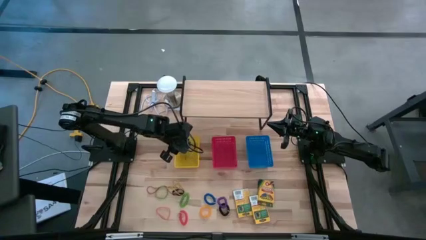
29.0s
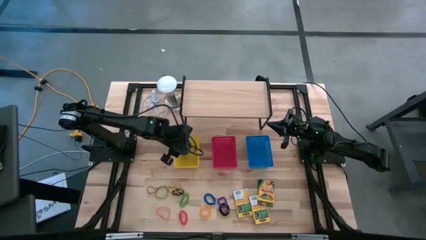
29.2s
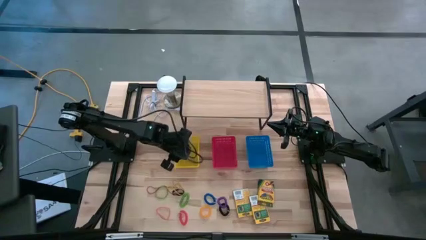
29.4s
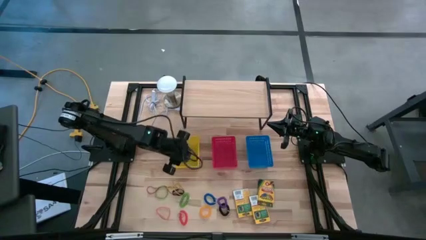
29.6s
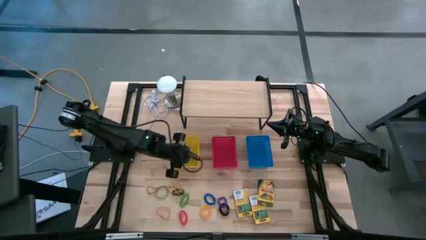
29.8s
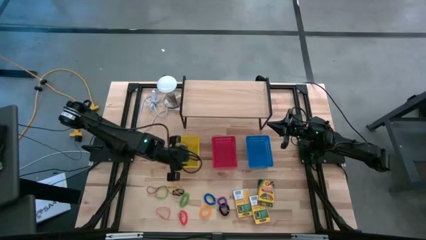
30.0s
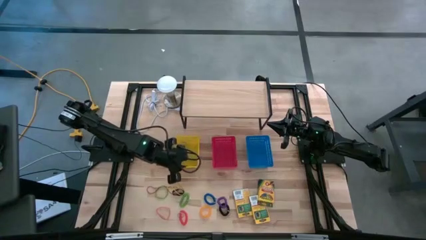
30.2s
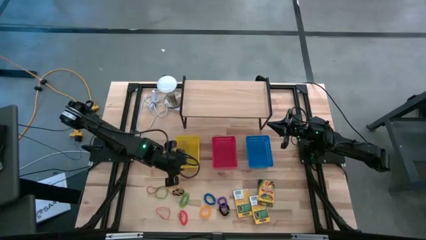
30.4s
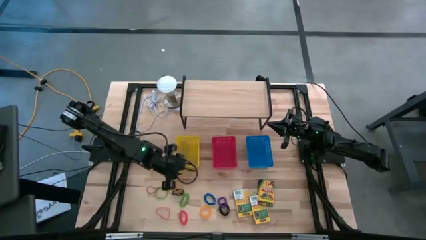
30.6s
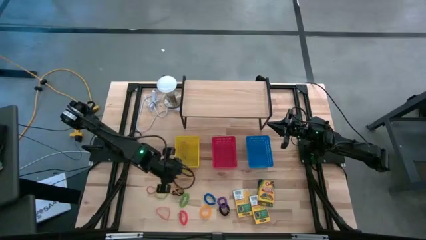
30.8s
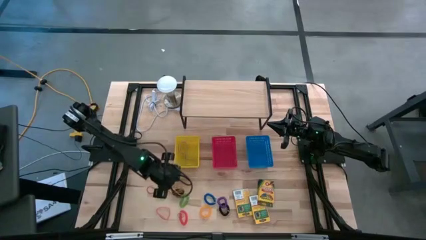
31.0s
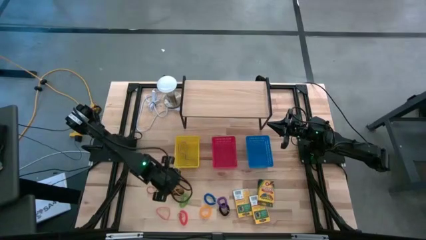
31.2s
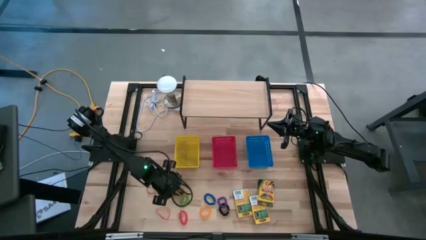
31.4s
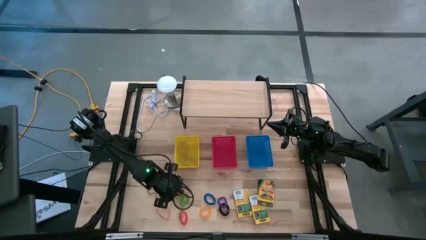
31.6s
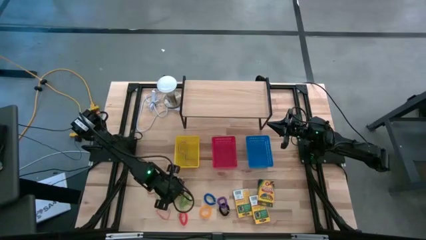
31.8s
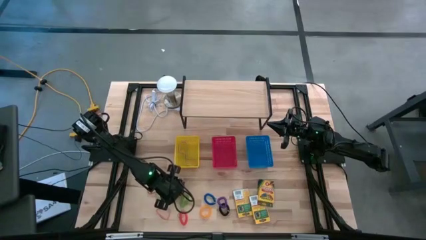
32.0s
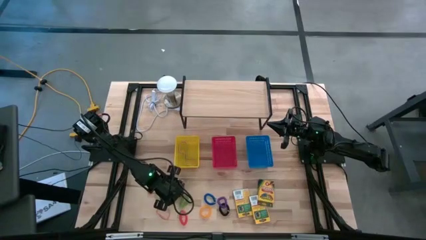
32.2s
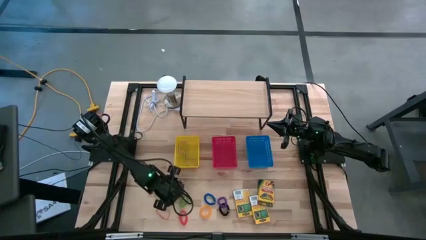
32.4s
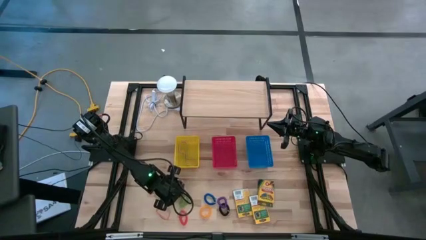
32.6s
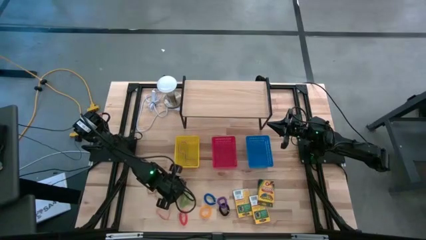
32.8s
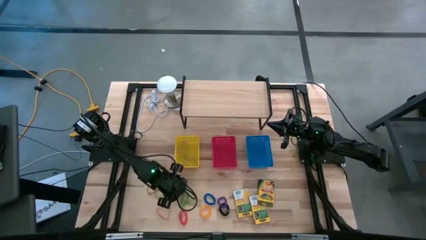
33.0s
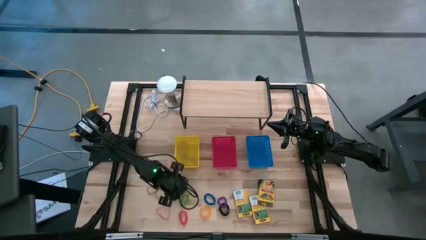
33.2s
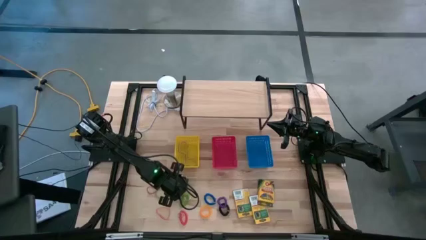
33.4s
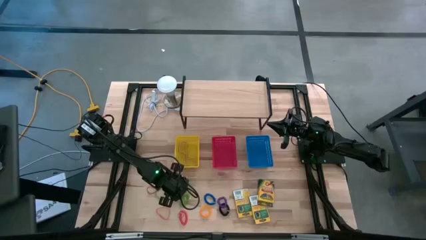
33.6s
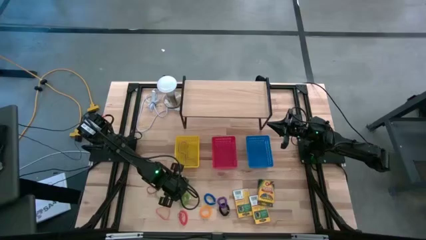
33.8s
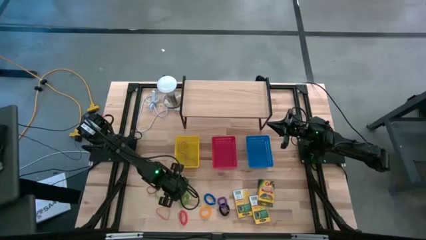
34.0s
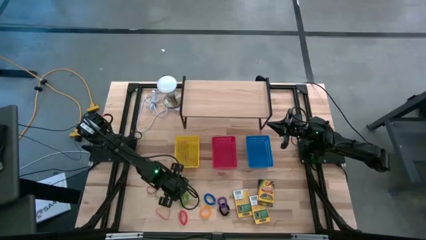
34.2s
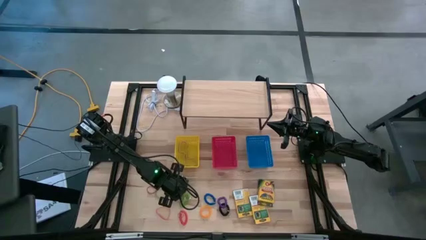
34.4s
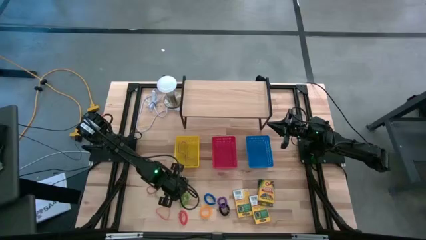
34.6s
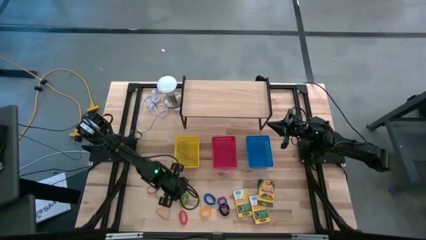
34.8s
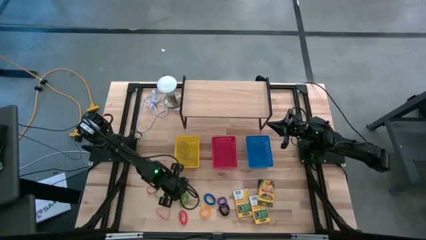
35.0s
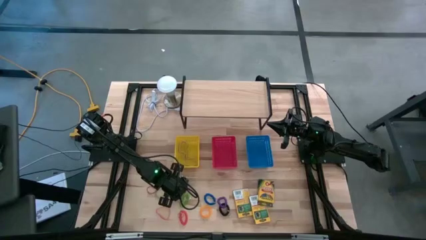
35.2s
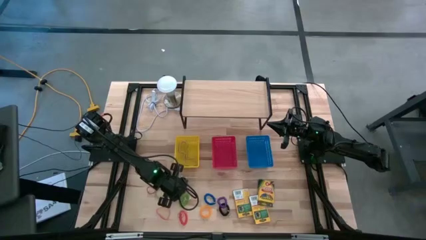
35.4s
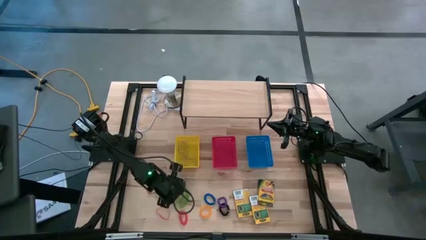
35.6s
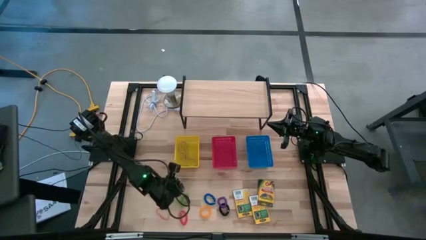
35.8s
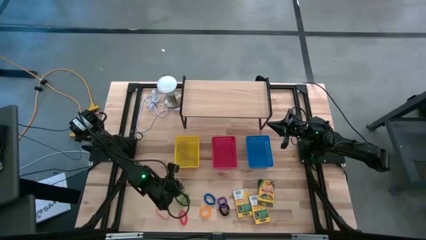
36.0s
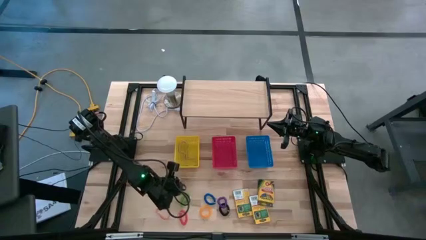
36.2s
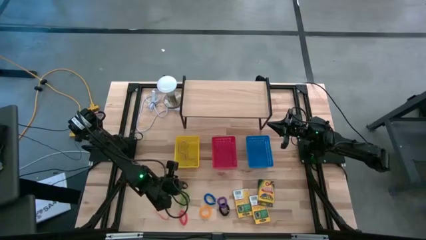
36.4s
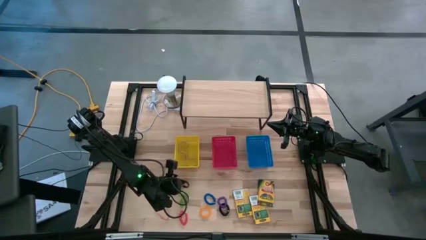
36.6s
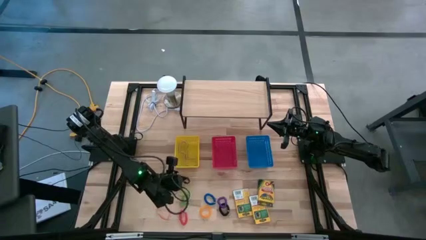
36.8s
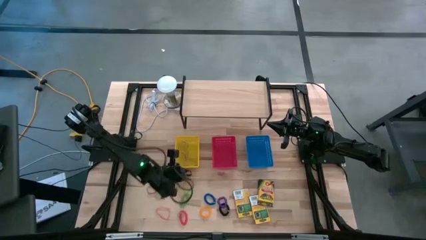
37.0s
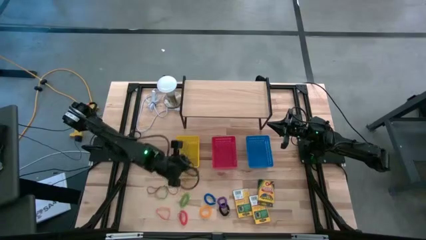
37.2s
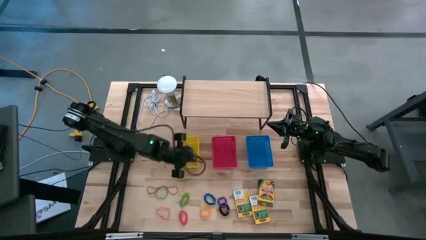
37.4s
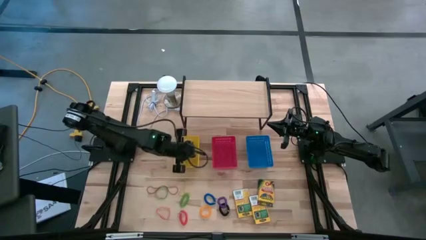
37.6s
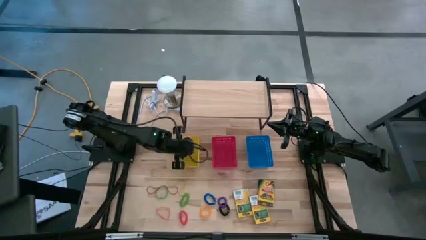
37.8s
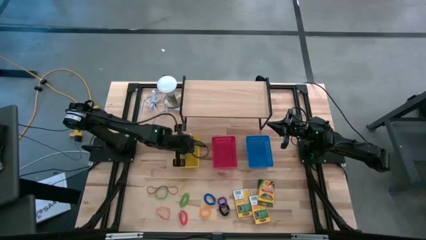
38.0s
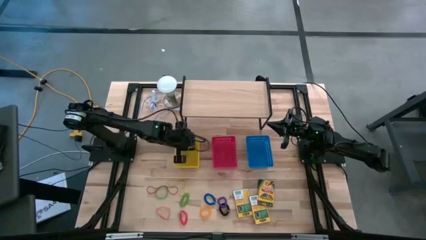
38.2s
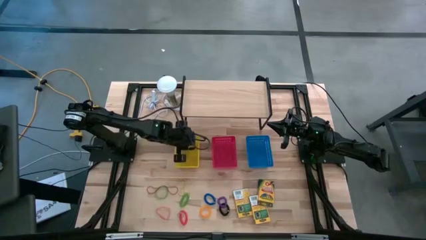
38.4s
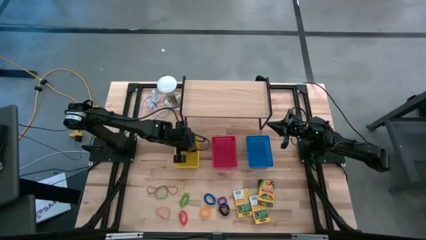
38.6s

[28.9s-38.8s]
Task: Pick & Place Office Desk Supplies
Put the black rubber band into the yellow bin

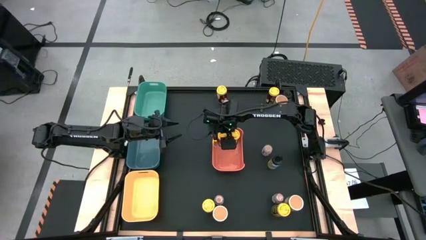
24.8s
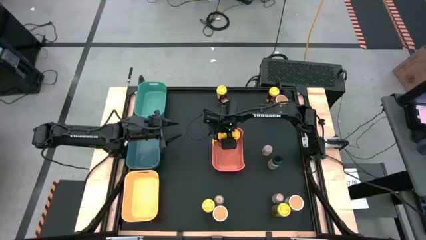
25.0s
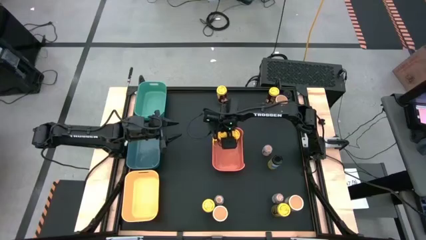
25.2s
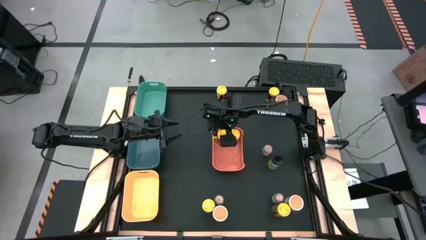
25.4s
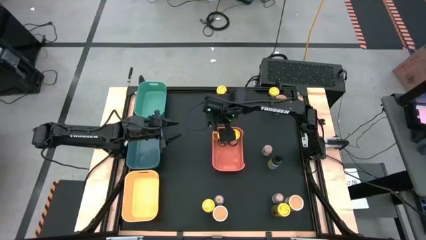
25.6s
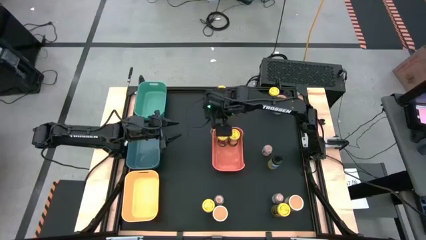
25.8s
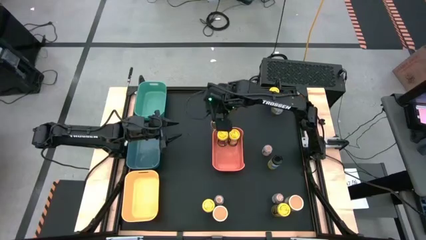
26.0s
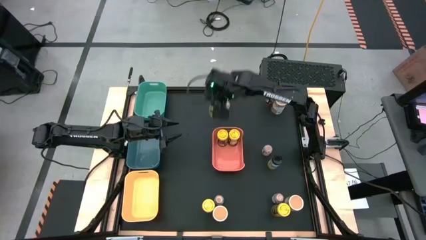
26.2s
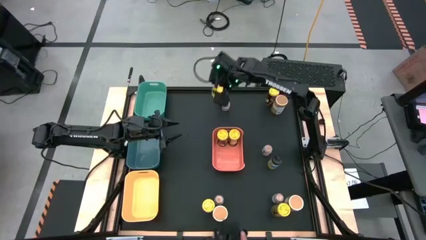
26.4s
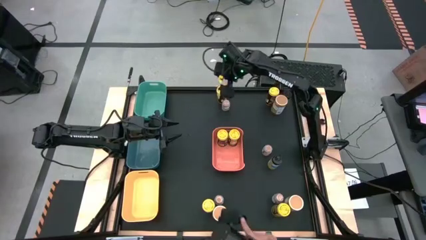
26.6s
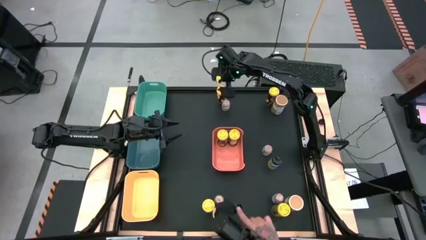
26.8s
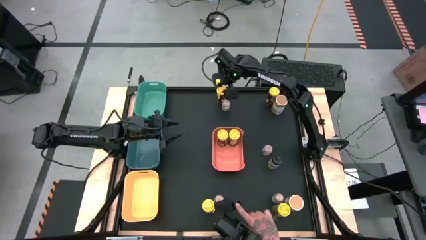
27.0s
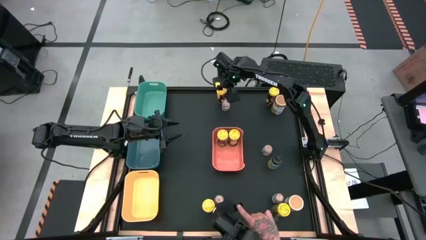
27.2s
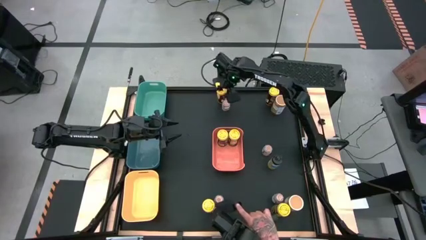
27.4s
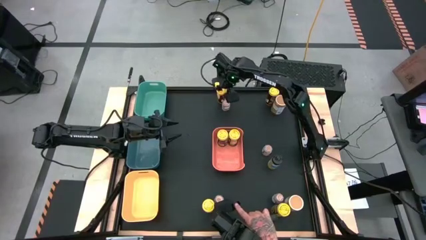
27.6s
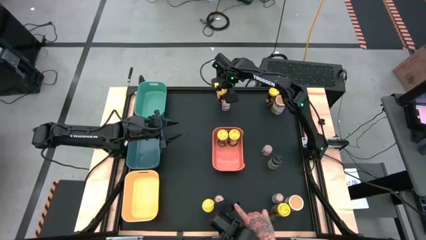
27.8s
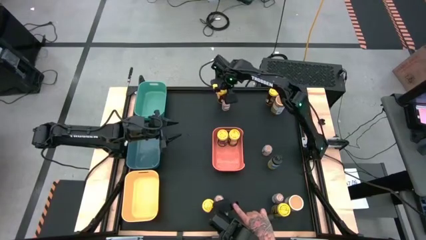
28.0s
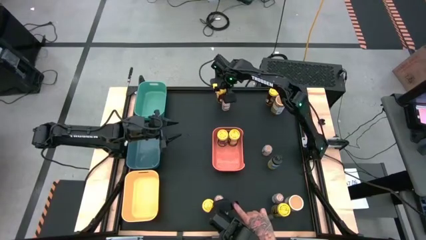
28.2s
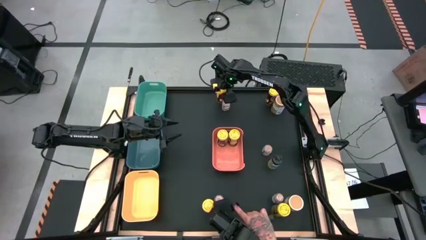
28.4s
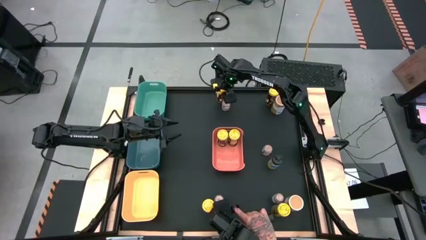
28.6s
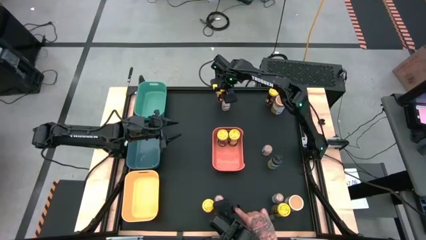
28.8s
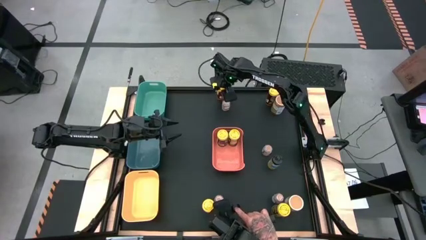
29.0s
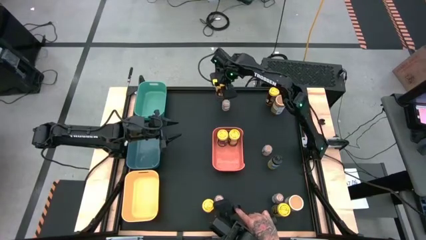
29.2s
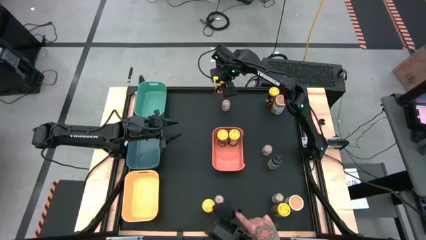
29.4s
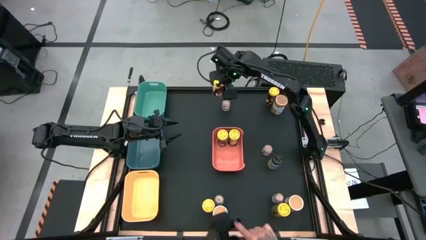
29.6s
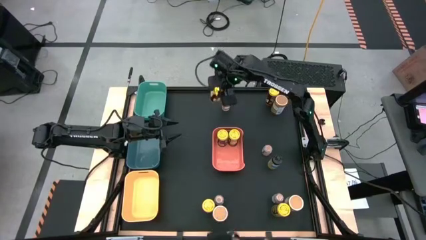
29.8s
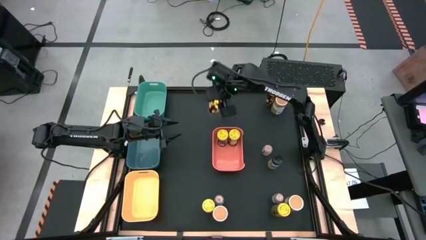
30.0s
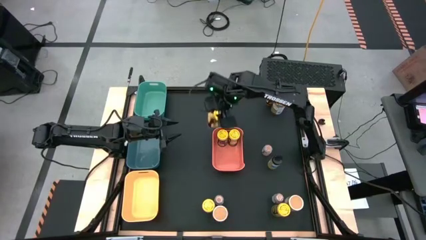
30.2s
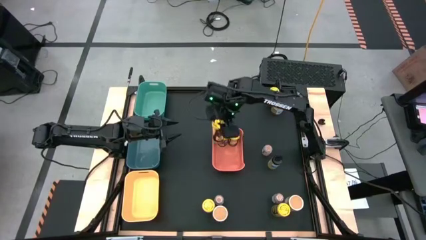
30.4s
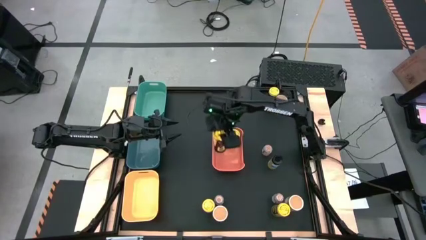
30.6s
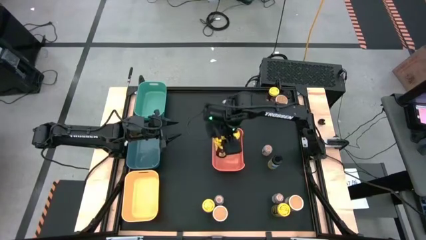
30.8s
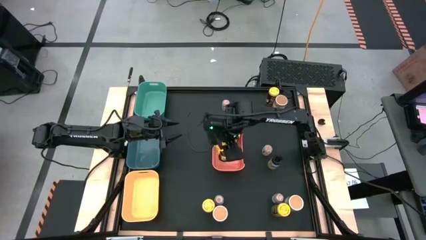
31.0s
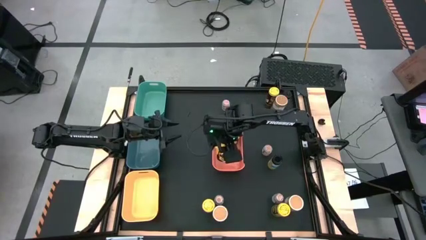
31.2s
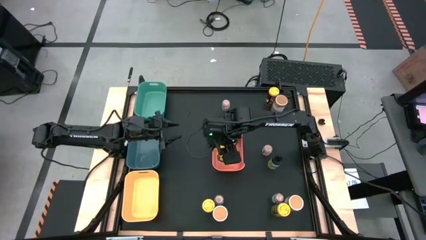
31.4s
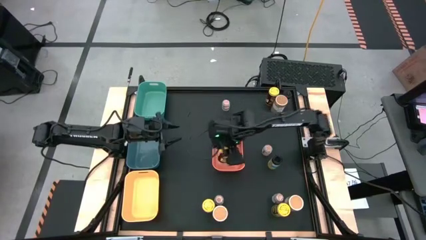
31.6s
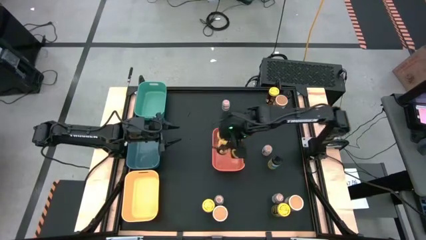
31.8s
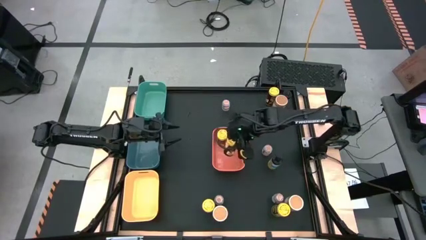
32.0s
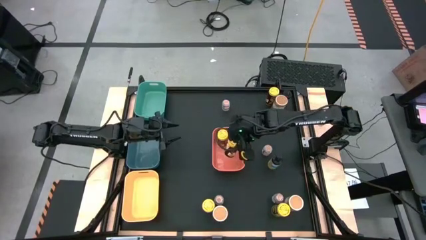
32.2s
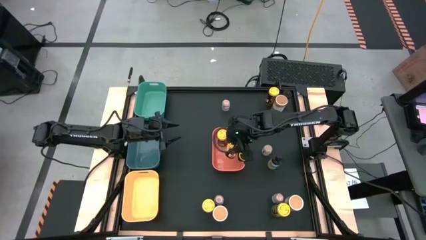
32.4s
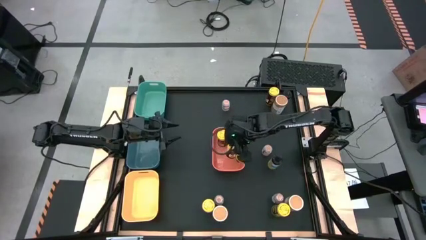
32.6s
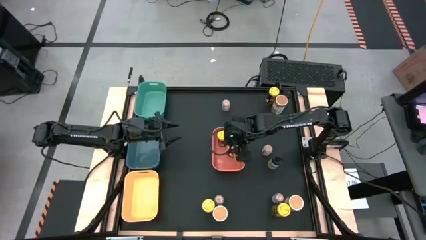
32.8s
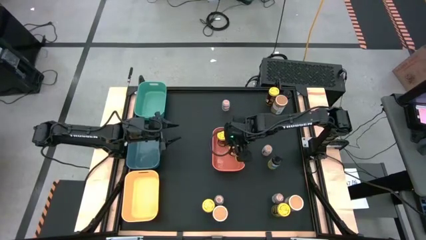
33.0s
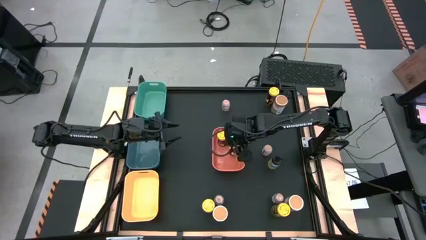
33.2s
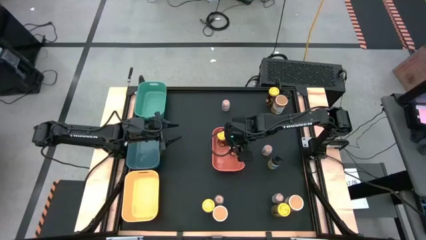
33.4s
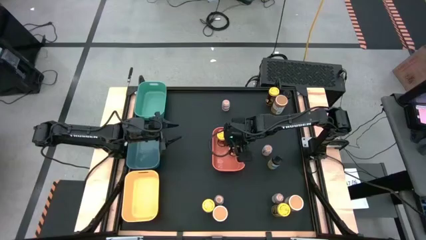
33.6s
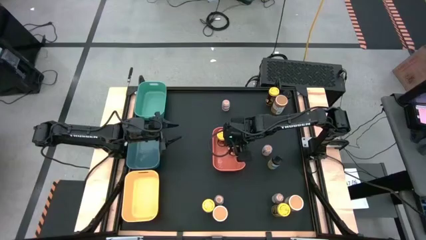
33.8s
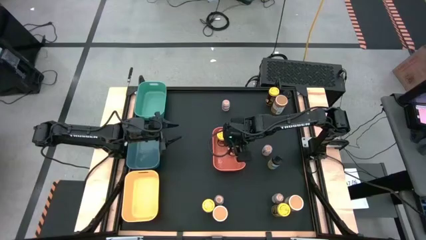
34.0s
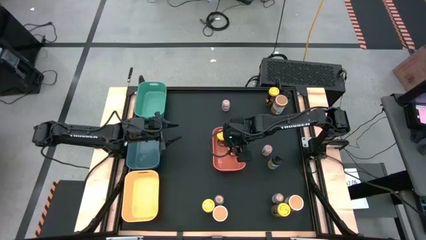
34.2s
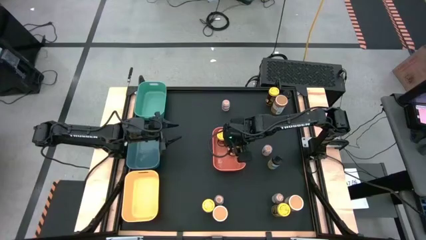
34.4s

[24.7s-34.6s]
Task: Sort spices by type
Put the yellow seasoning can in the orange bin
